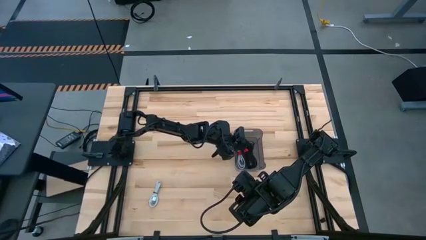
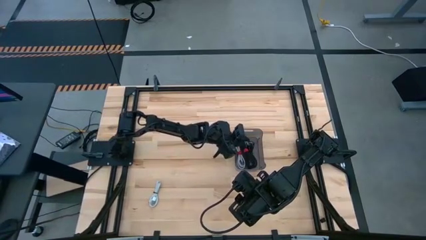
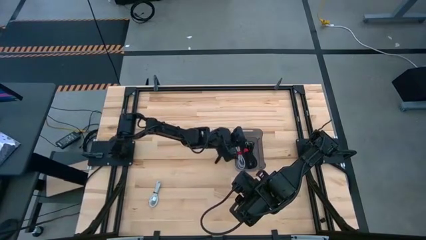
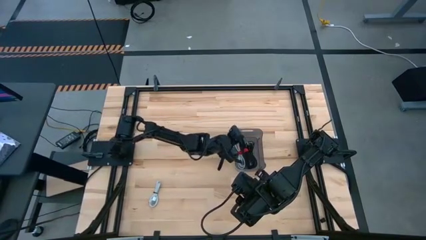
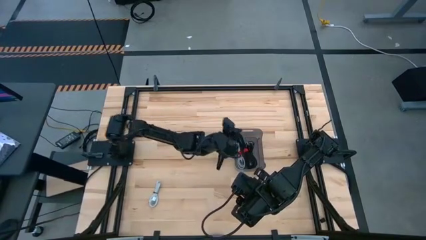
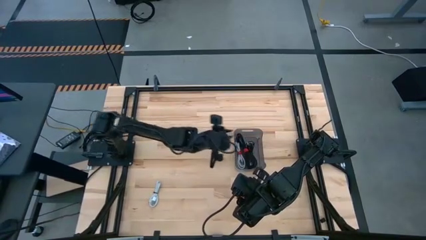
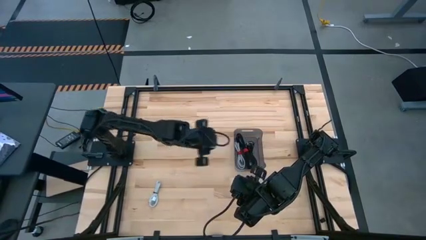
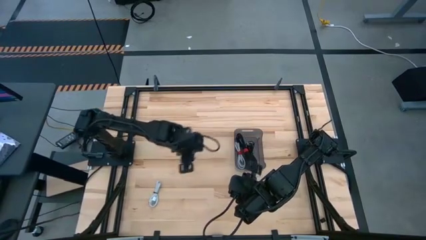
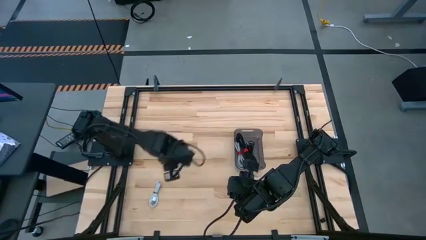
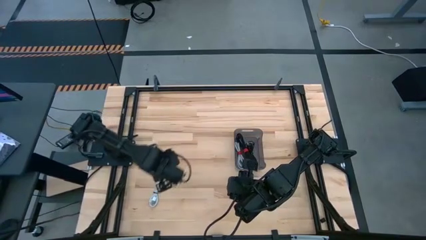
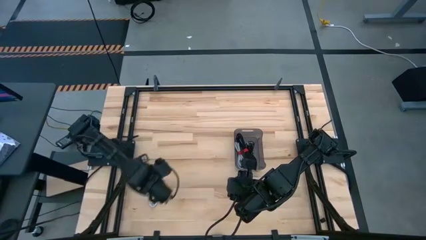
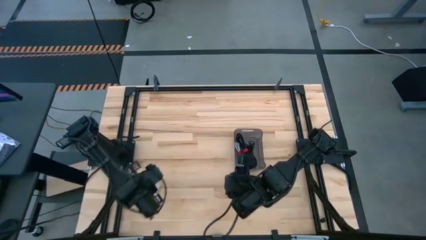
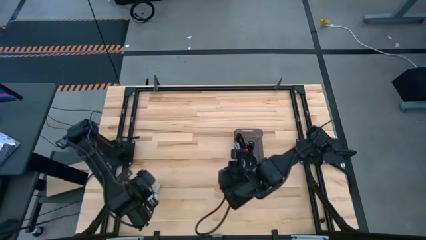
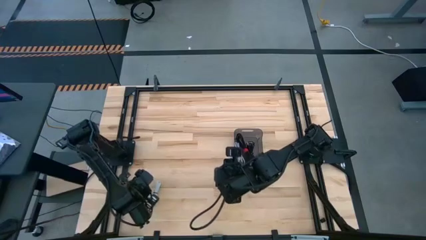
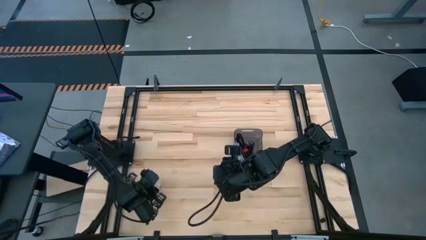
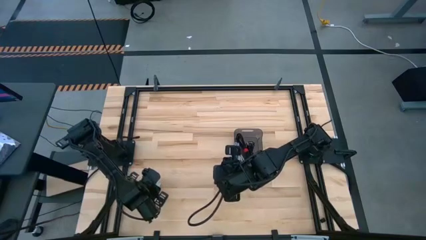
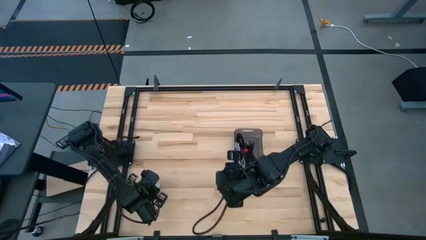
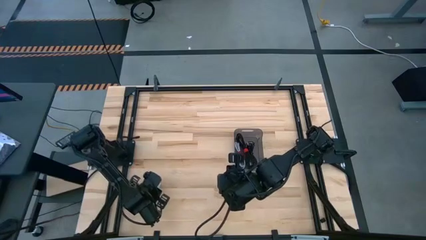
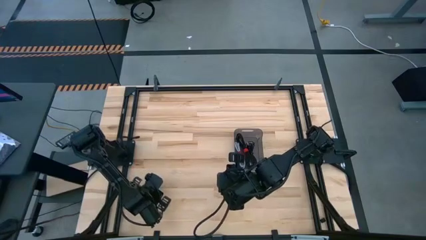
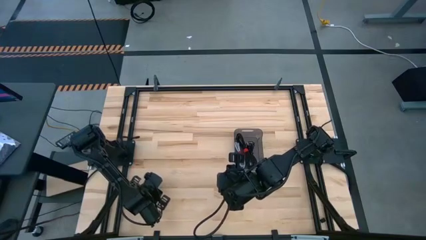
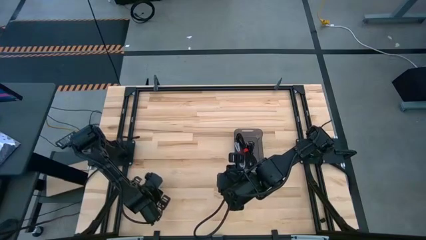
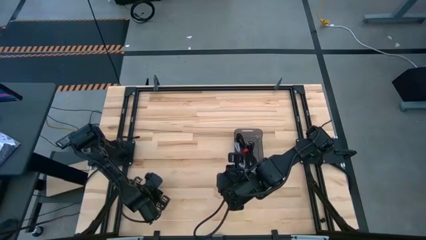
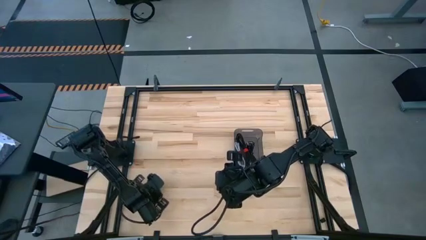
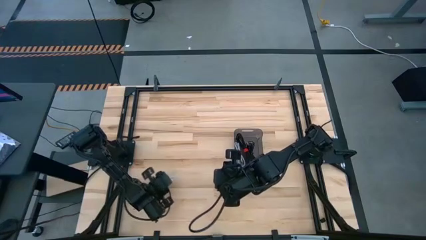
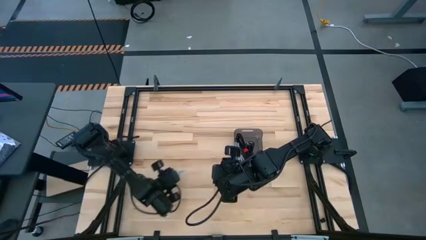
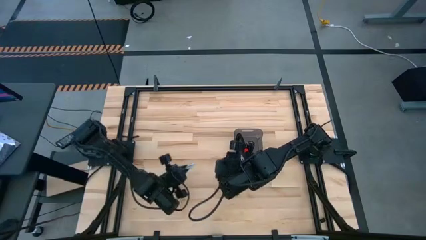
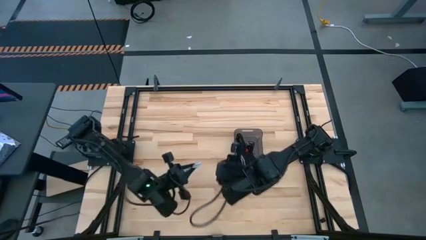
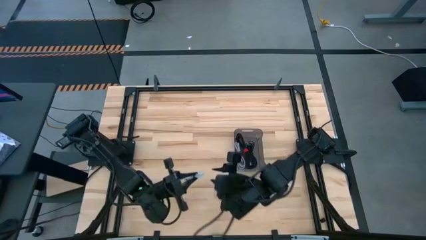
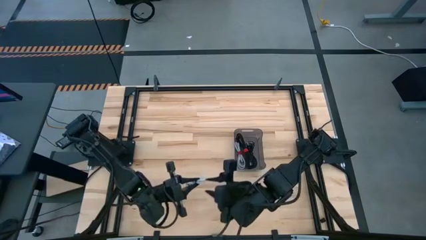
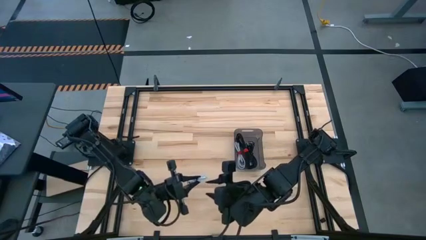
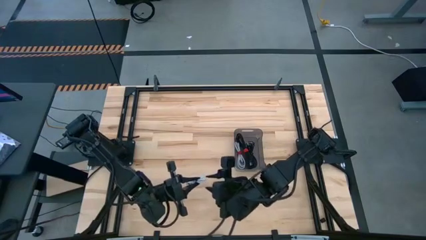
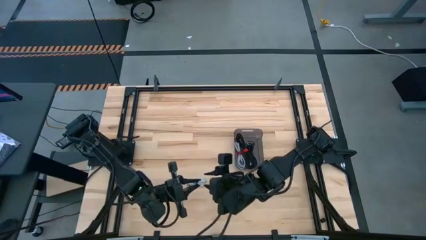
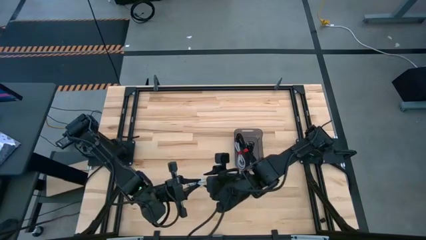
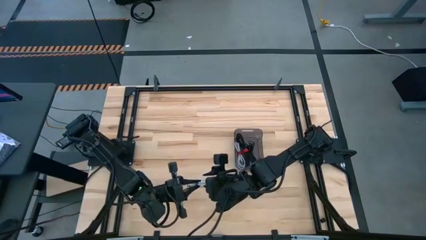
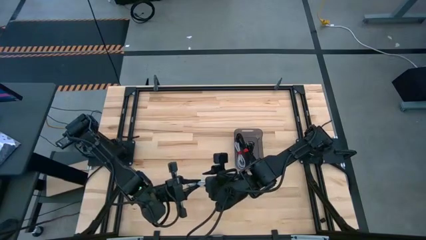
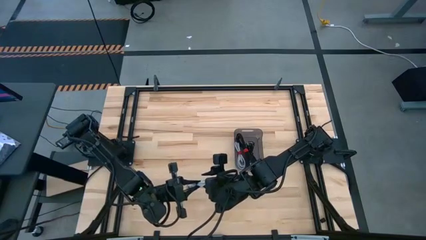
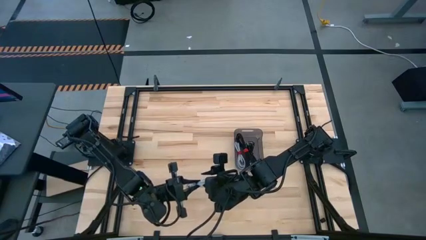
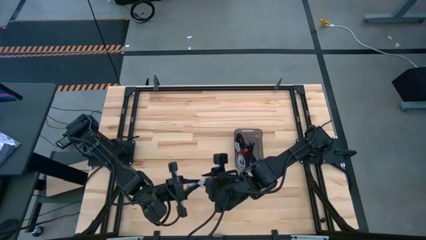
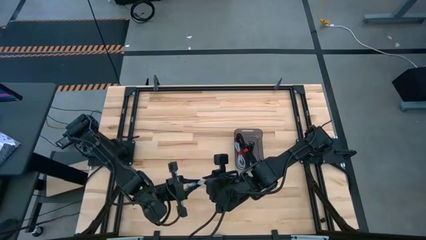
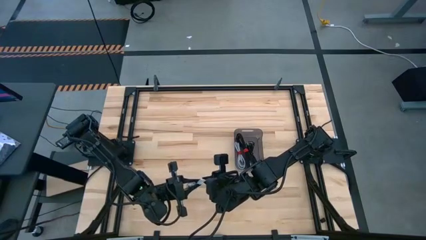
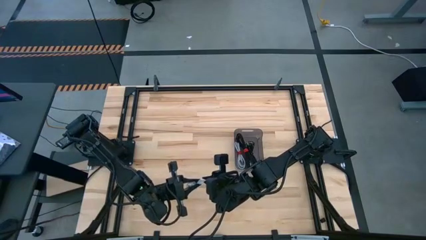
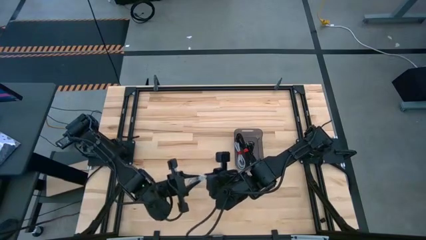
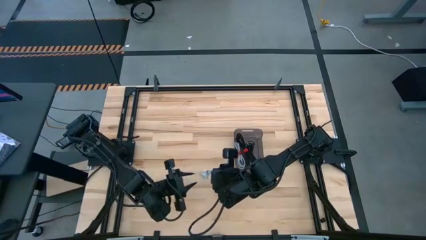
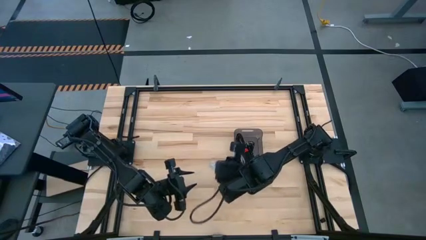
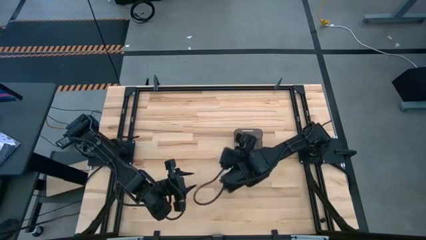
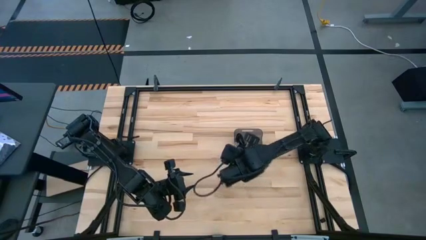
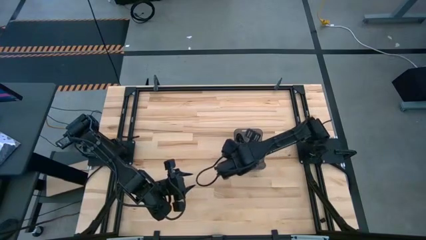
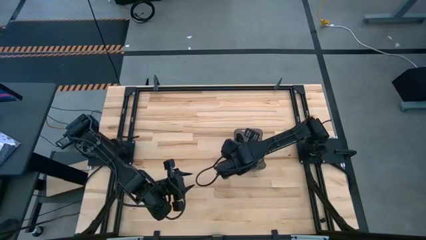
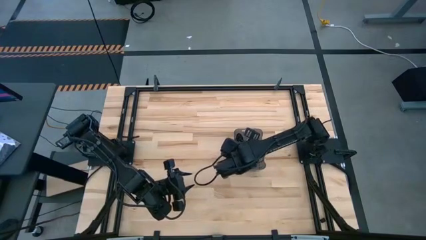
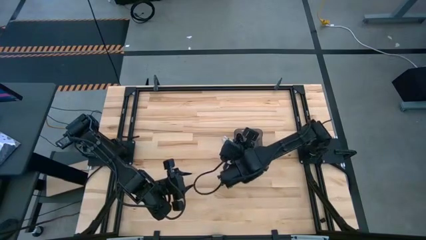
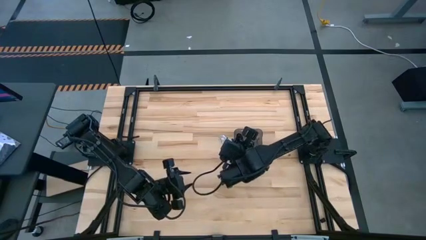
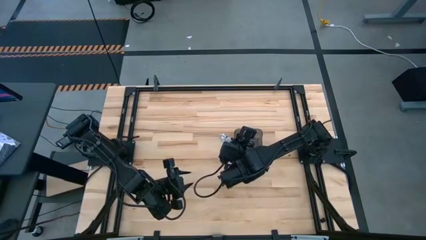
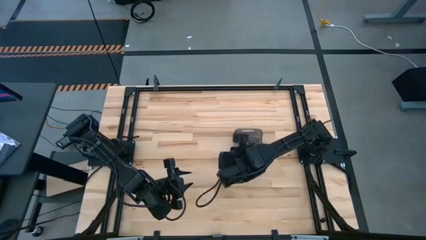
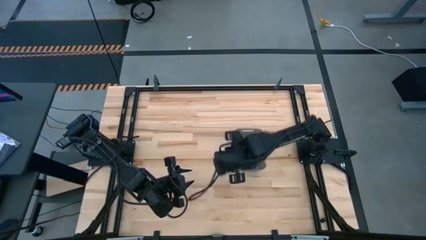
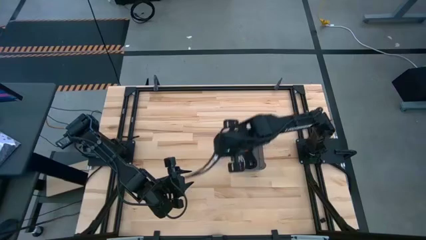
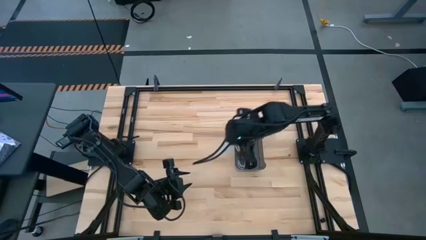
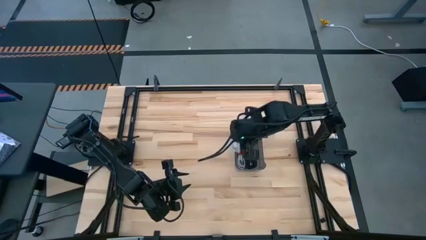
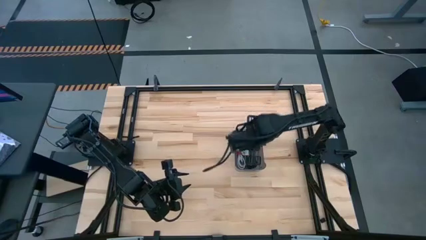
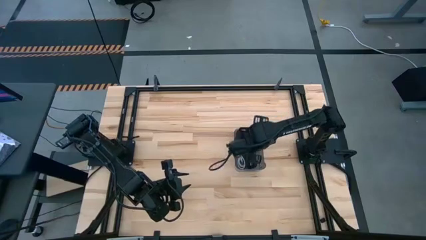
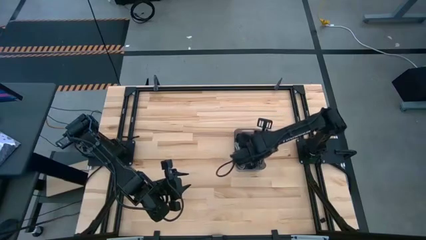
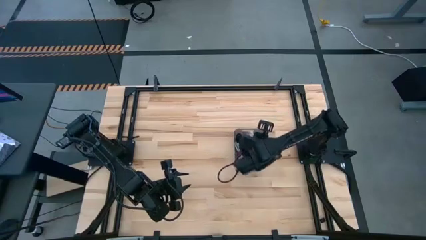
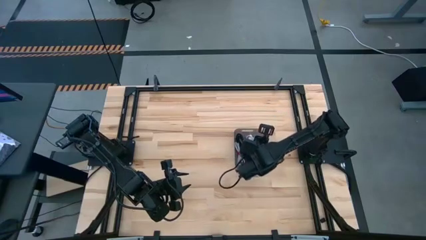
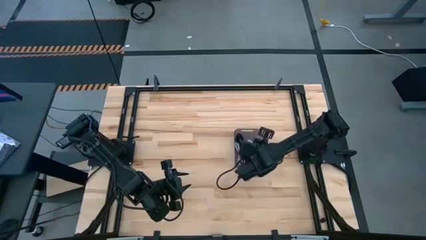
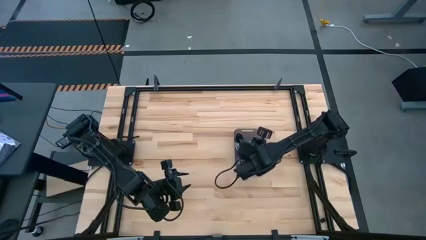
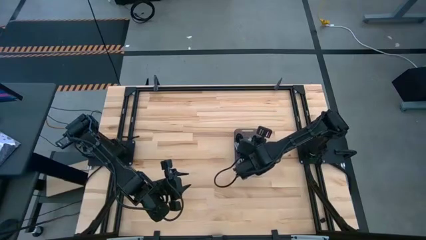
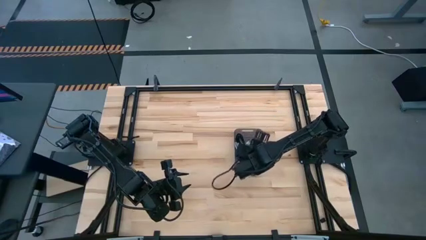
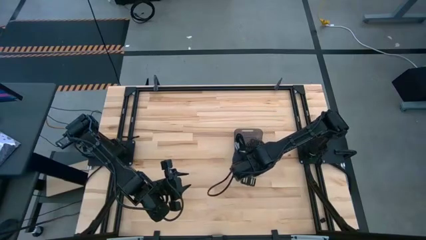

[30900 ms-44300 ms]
Task: Pick and place USB-C Cables
Put the white charger cable into the black bin
